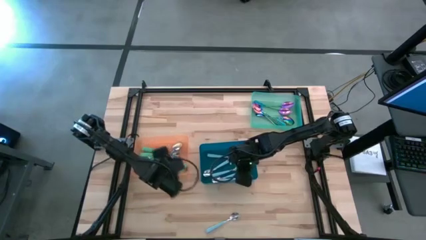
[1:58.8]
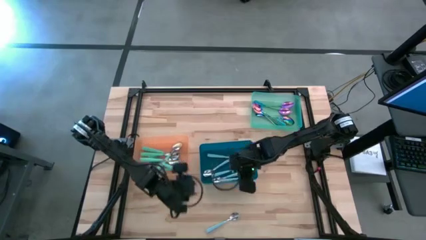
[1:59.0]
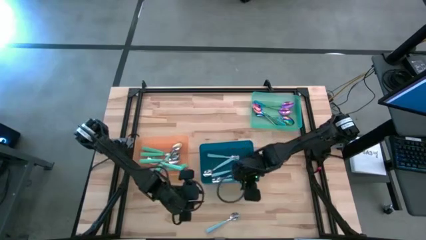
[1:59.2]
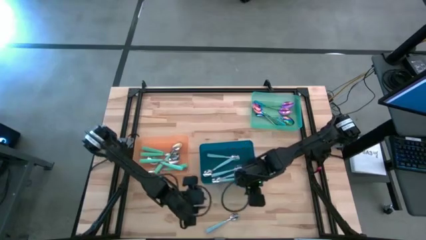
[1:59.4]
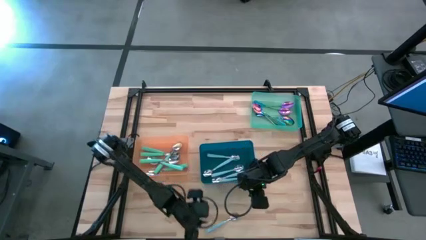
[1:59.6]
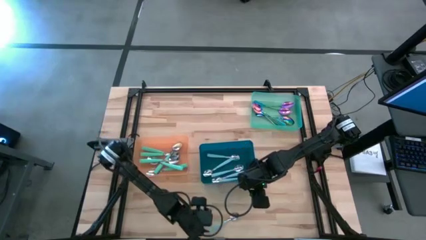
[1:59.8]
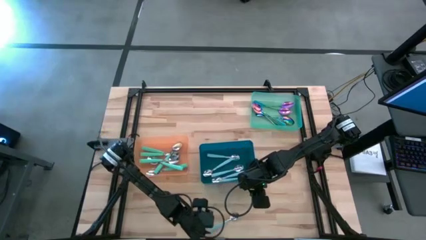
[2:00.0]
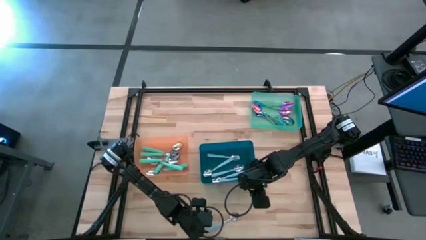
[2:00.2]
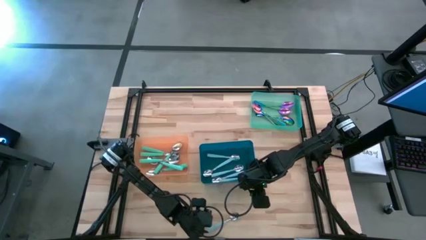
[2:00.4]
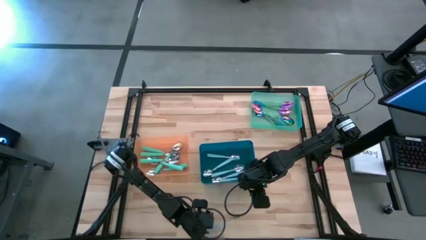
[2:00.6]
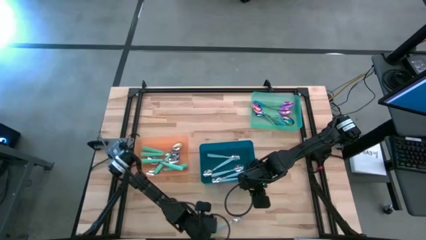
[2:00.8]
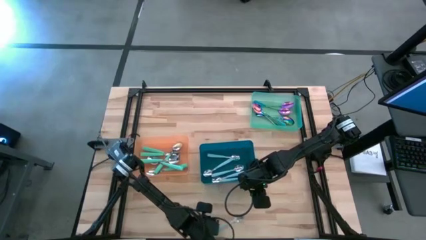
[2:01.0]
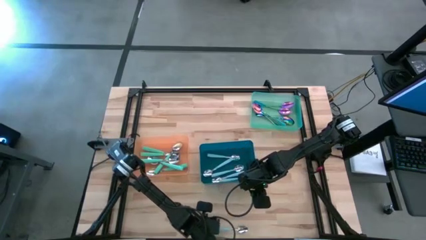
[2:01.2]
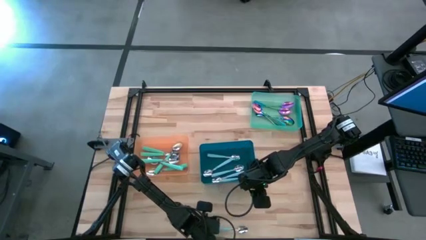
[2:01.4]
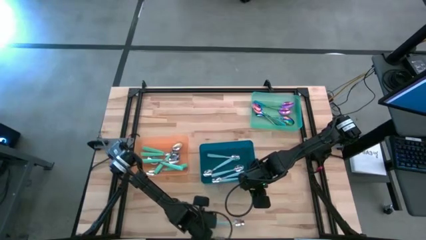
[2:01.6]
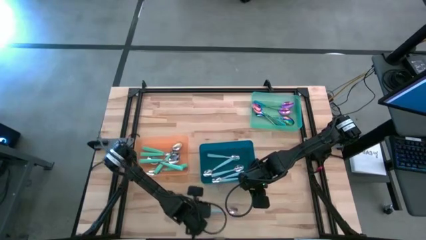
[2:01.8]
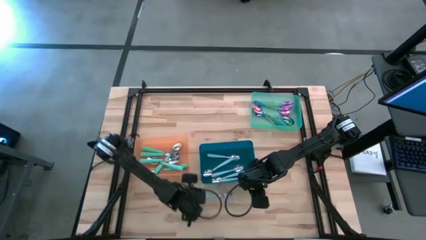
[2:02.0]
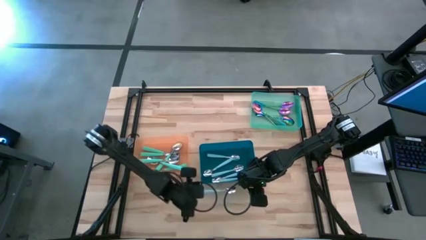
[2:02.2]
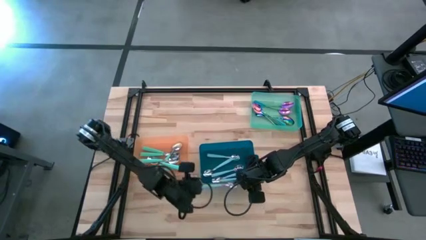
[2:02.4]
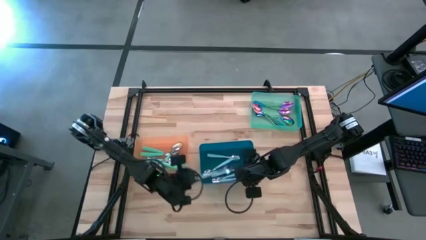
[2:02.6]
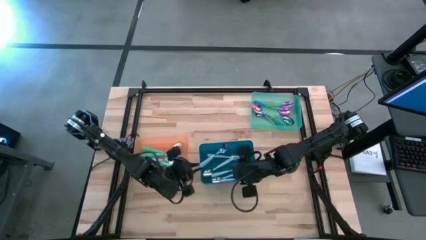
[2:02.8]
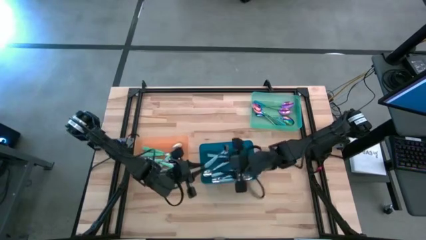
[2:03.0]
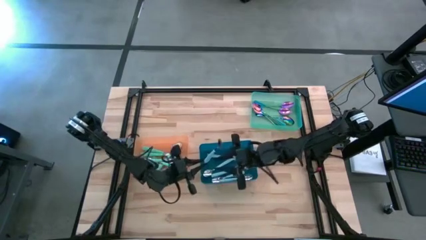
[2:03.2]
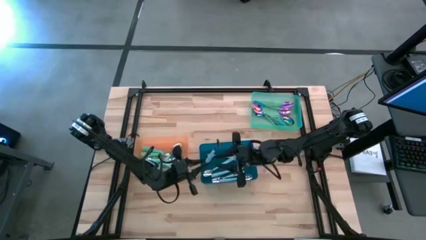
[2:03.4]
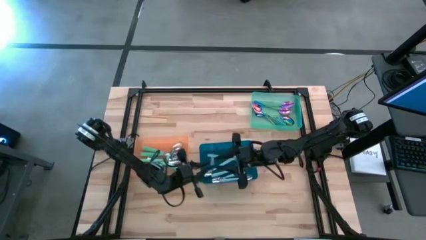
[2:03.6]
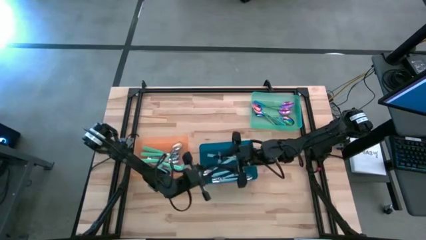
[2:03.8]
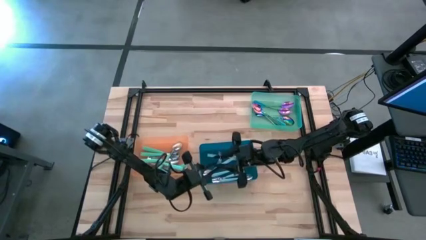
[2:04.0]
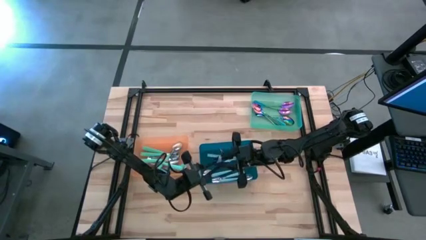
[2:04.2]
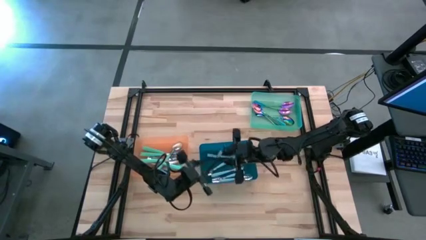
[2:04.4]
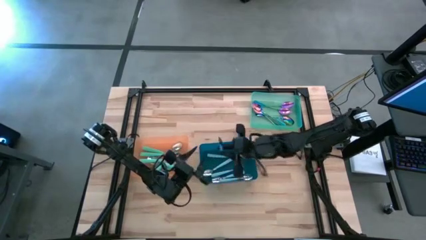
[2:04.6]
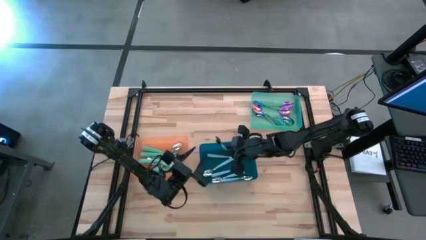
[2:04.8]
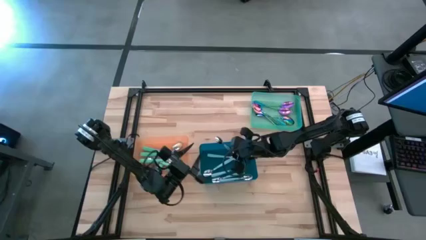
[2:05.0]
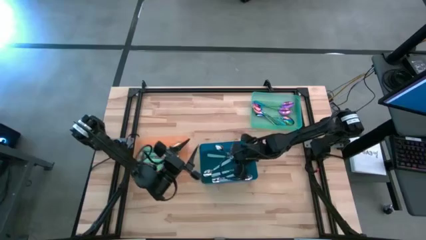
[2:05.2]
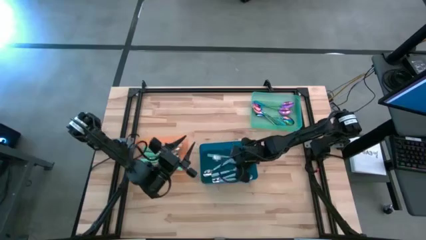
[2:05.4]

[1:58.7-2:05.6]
Task: Sort silverware by color (type)
Put the light blue spoon into the blue bin

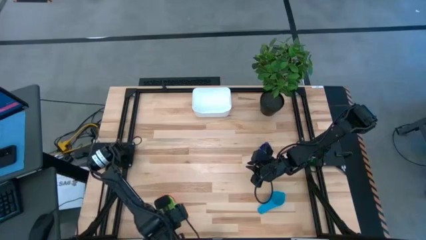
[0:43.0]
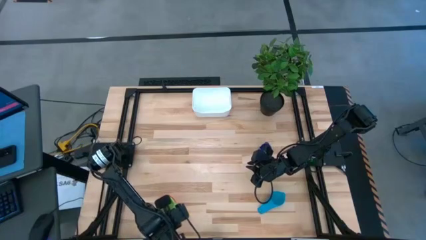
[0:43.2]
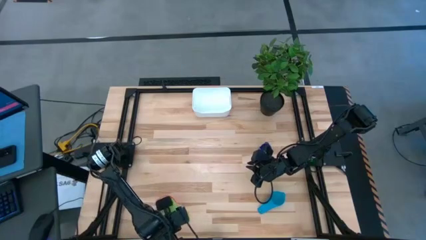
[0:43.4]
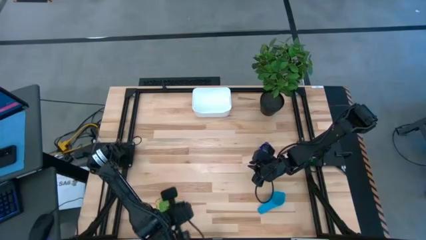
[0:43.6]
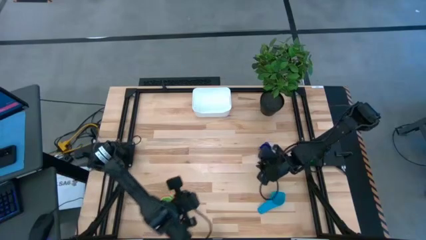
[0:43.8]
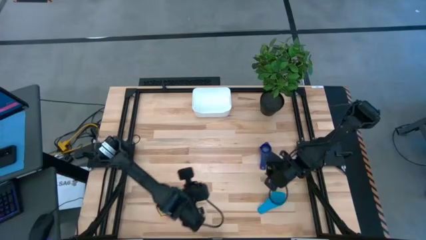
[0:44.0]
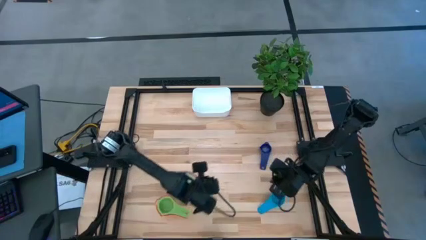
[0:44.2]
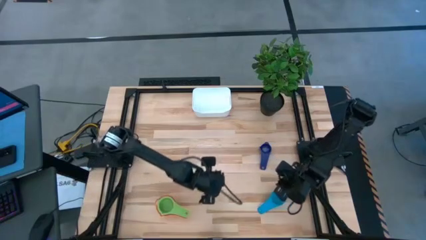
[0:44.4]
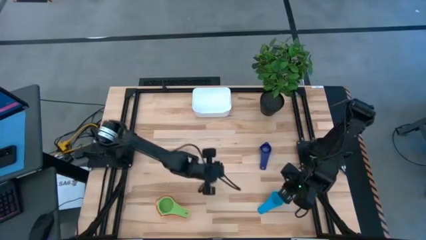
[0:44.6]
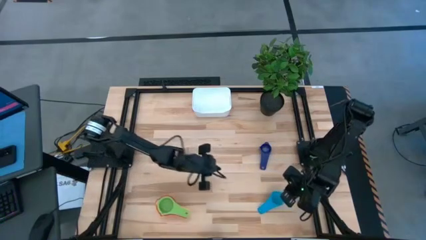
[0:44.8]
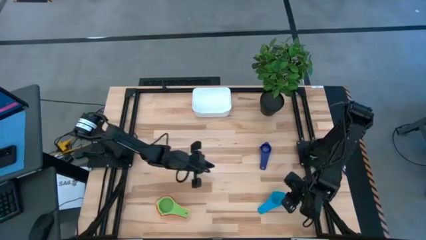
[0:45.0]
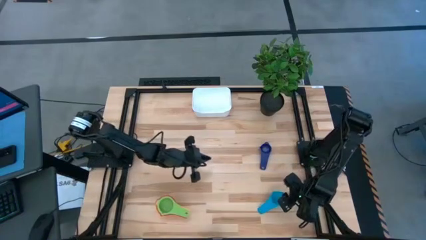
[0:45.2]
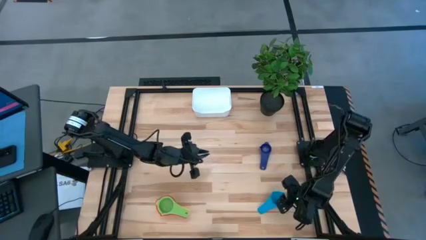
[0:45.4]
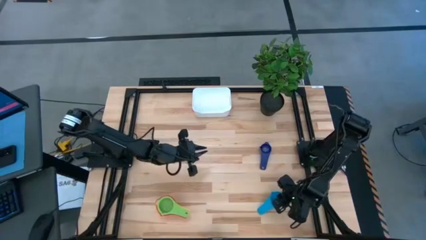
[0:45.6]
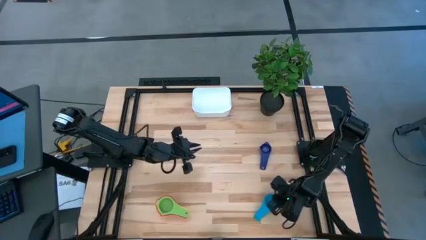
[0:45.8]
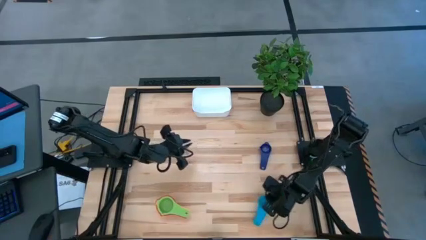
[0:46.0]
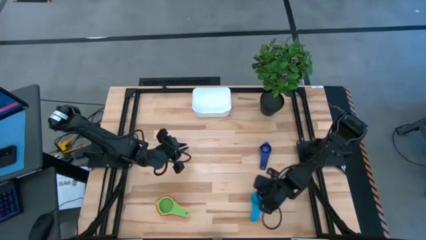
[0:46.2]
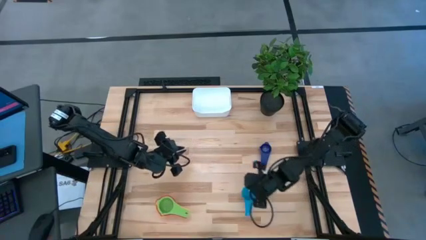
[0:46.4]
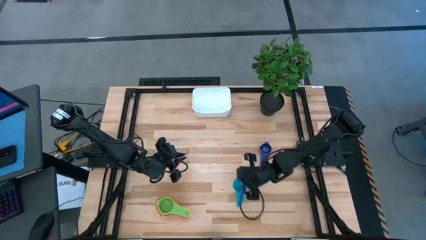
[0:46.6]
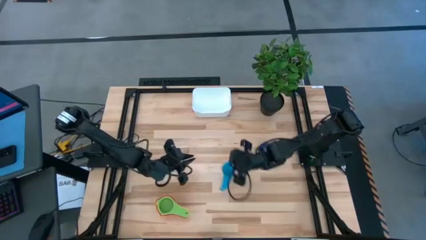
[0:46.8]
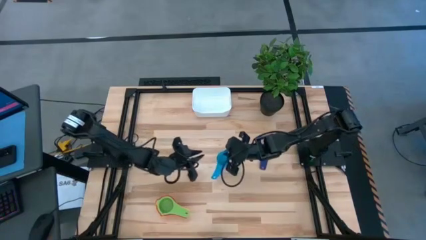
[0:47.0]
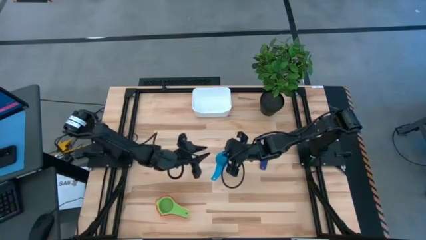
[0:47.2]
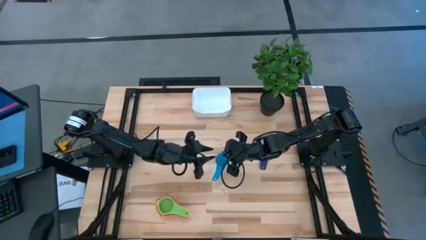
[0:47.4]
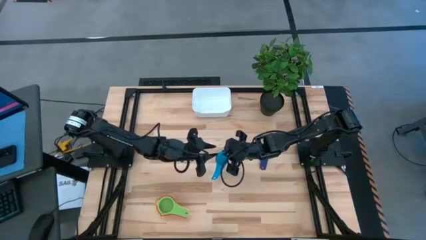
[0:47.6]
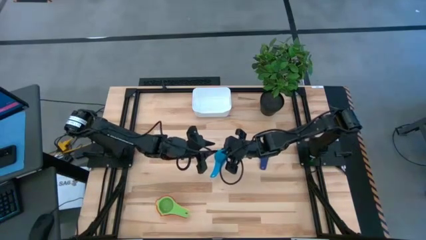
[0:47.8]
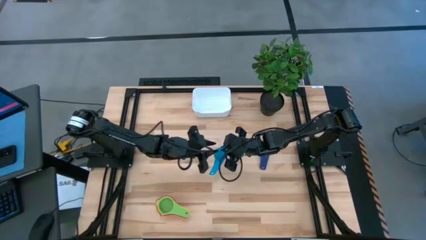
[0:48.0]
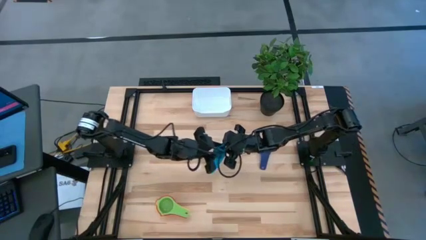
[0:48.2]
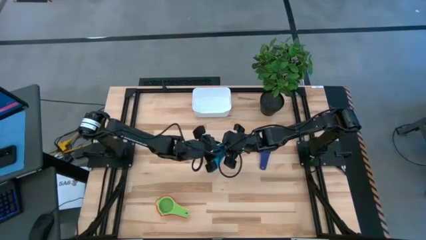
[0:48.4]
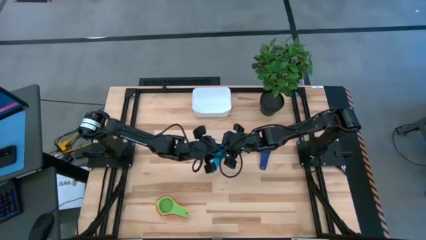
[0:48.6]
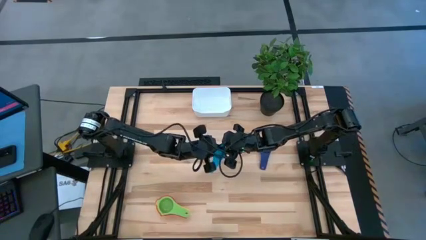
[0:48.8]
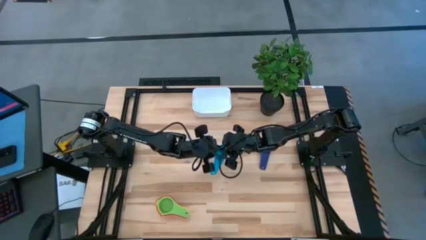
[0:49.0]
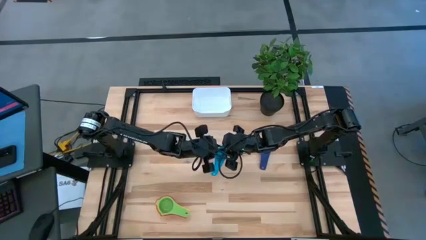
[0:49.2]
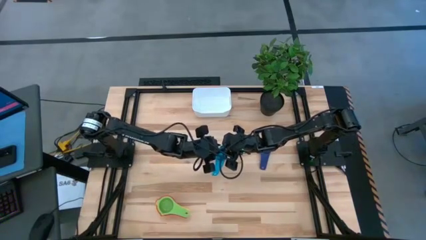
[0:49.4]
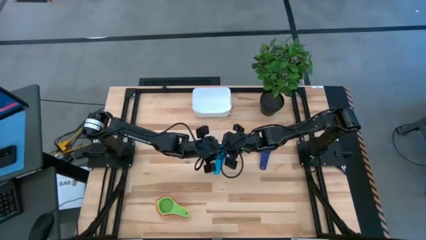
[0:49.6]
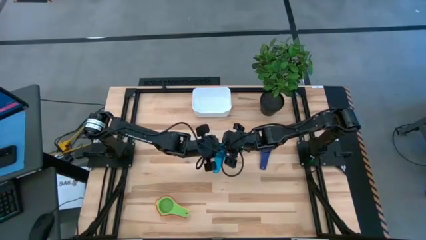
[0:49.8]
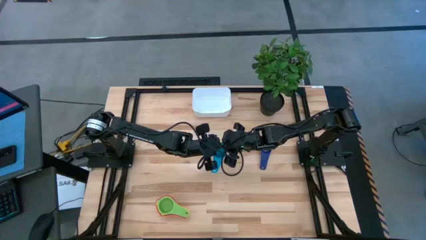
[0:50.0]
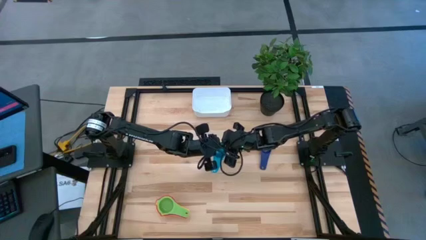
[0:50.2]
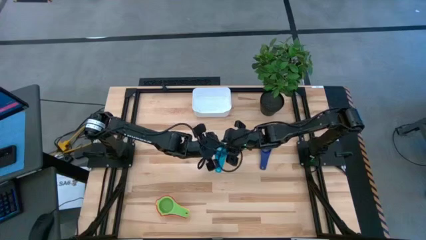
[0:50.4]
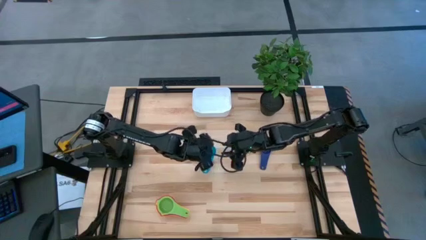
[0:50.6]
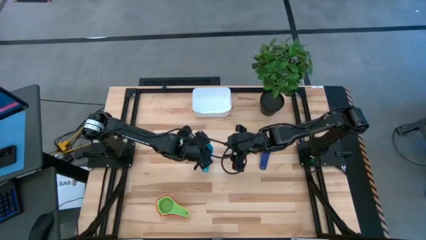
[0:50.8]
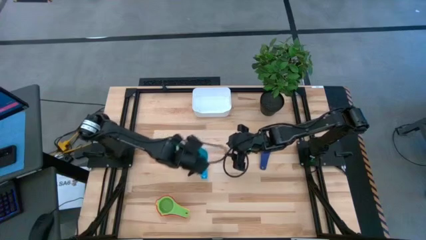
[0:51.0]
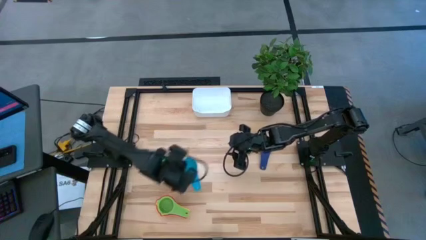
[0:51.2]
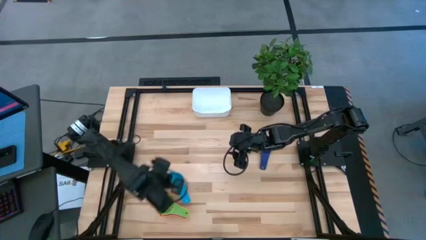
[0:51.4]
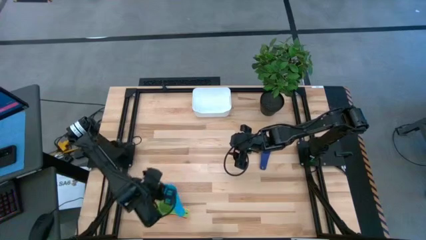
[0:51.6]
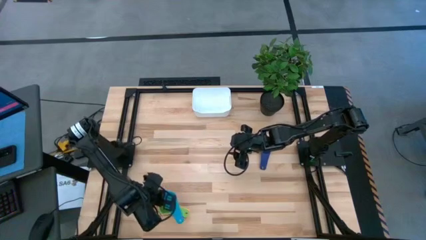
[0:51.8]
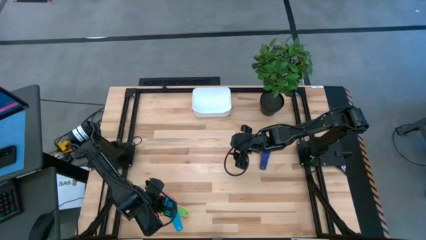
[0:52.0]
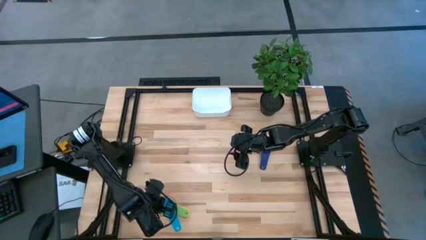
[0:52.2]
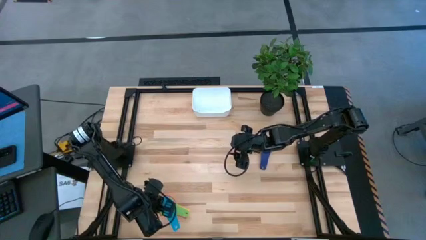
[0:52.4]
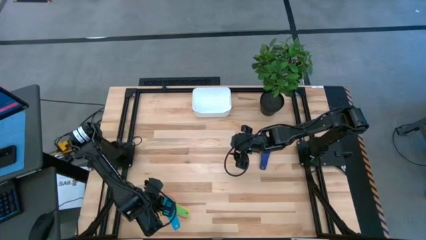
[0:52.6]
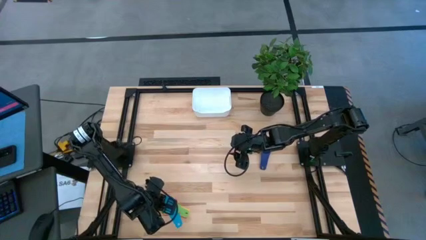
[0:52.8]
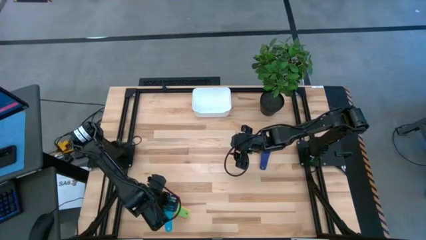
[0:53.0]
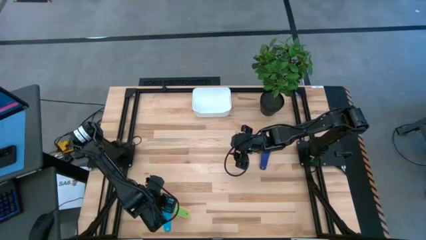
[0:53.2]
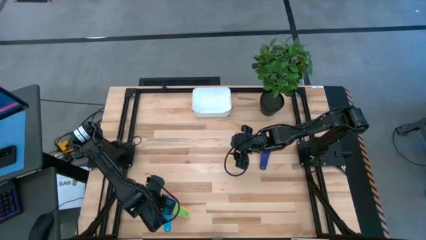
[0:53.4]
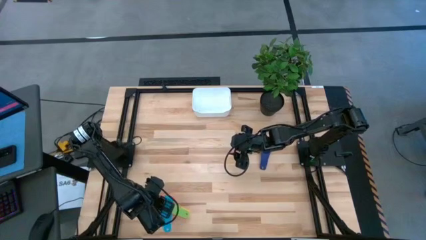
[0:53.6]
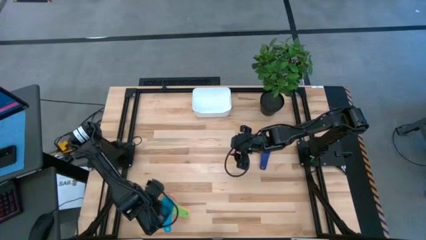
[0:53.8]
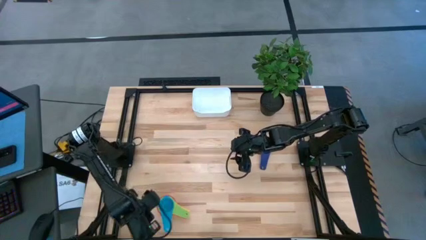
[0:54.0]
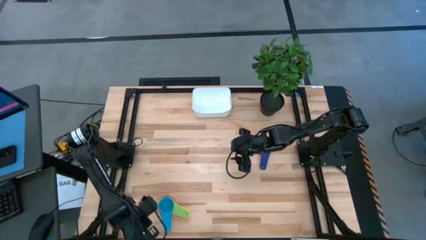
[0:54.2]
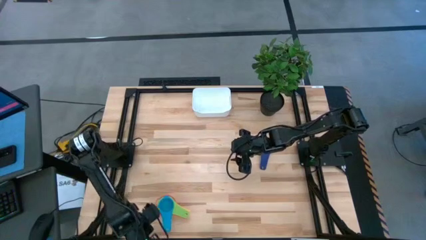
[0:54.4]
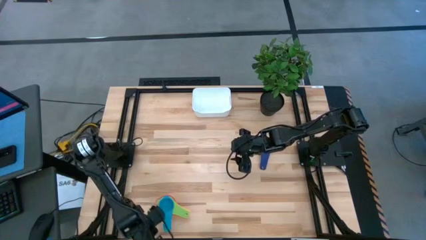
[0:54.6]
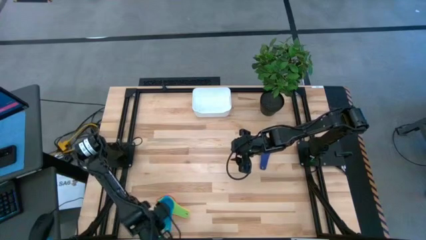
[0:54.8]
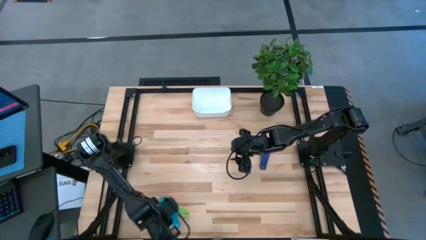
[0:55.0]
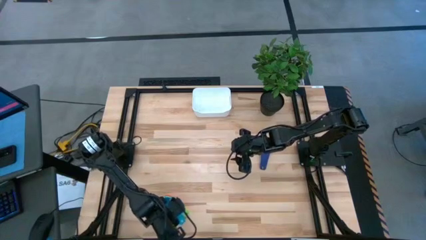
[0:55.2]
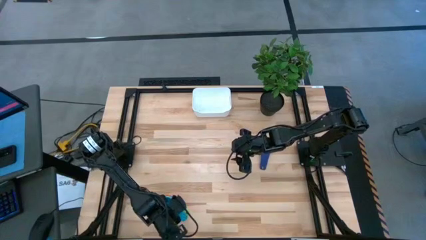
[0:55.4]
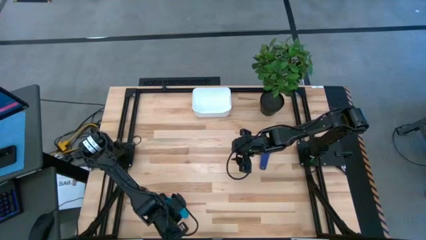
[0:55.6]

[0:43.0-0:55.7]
Task: Nest measuring cups in basket
Stack the light blue measuring cup into the green measuring cup
